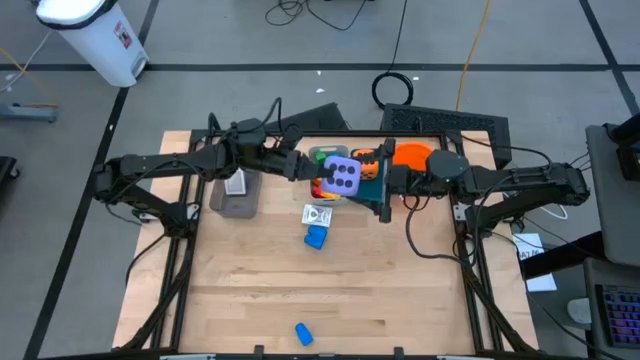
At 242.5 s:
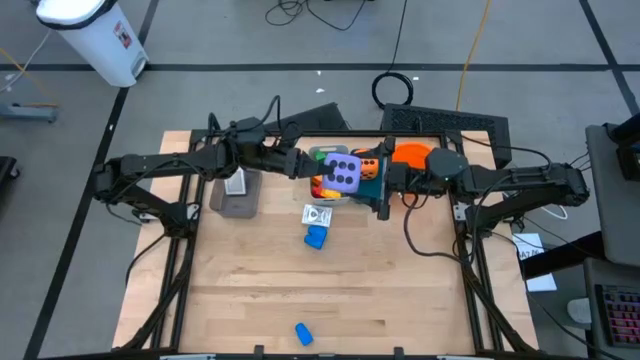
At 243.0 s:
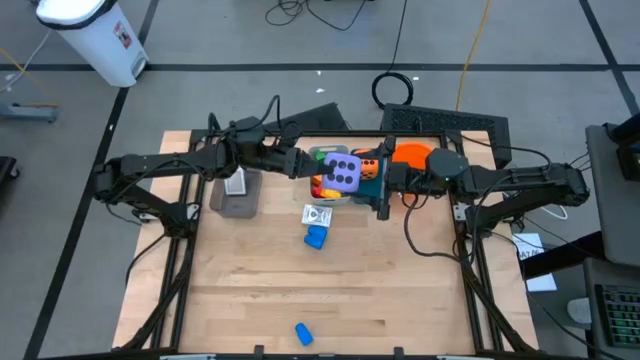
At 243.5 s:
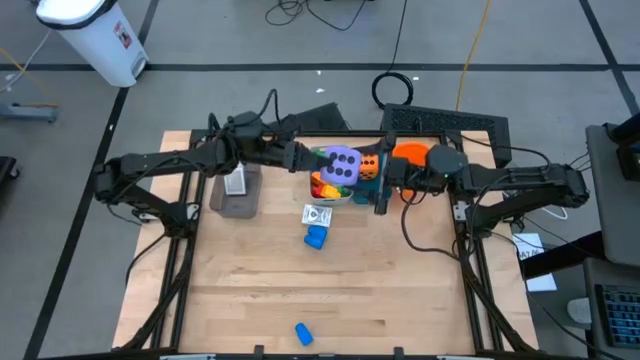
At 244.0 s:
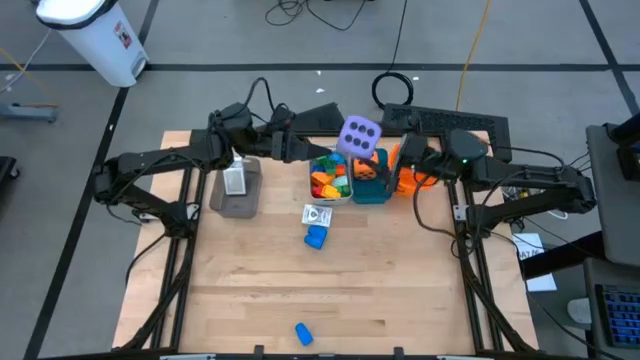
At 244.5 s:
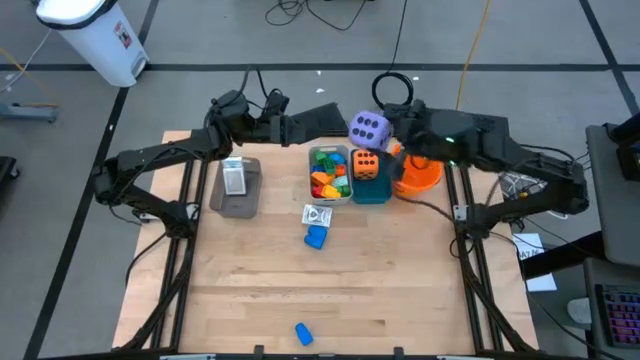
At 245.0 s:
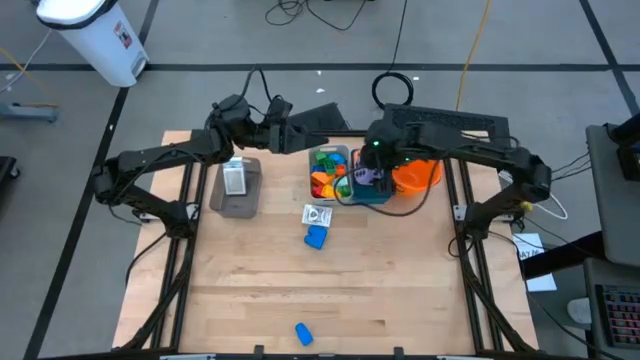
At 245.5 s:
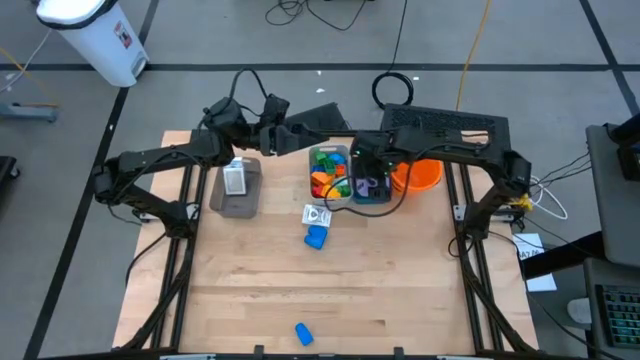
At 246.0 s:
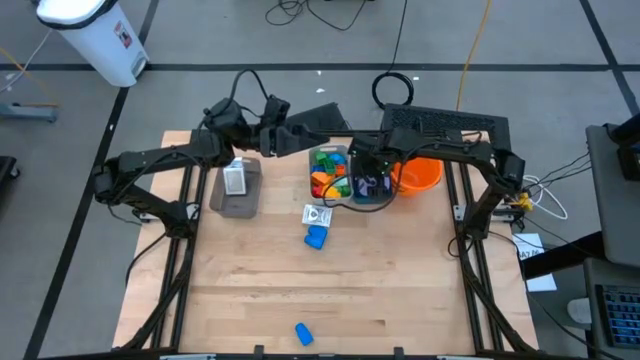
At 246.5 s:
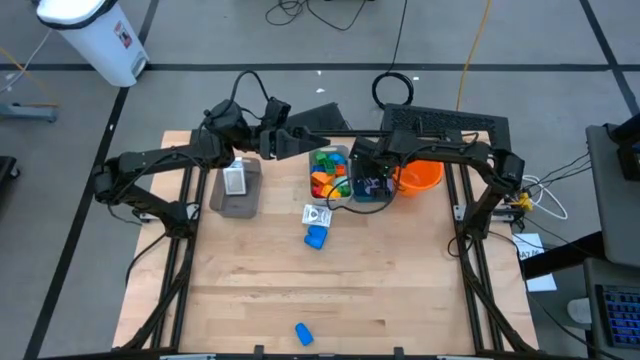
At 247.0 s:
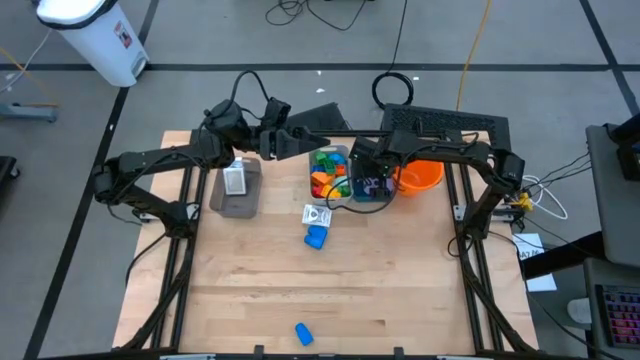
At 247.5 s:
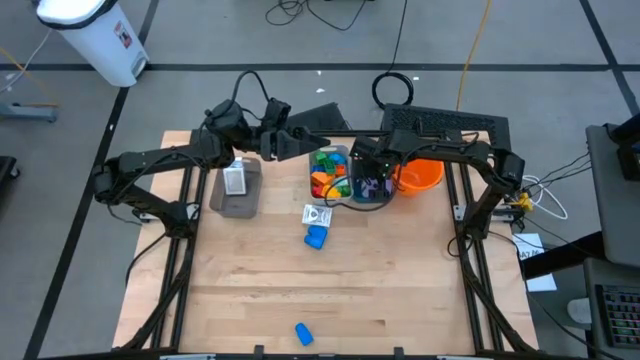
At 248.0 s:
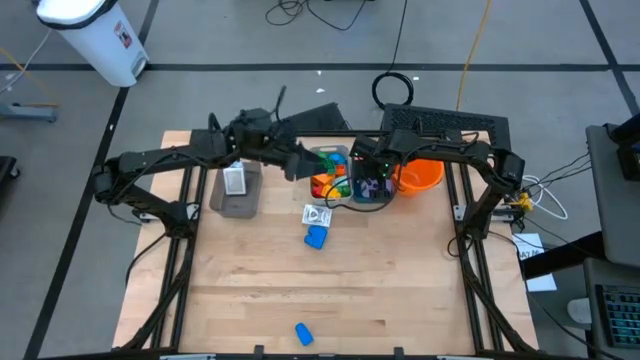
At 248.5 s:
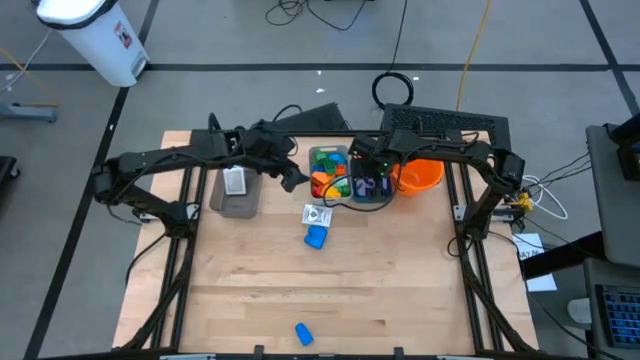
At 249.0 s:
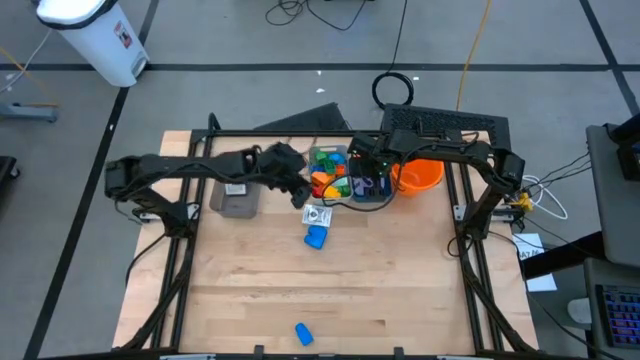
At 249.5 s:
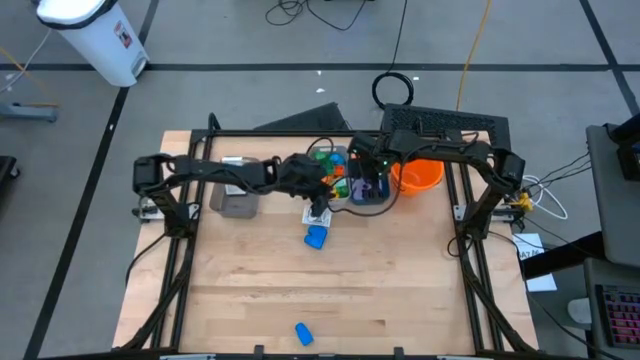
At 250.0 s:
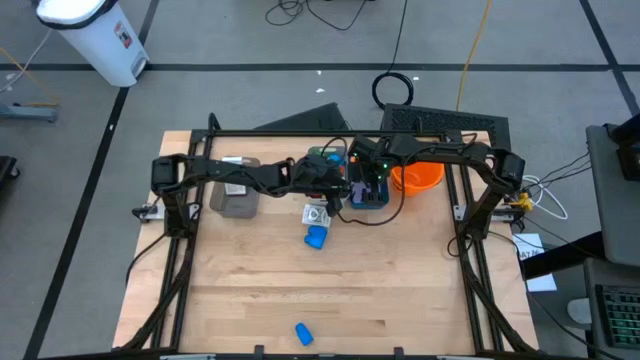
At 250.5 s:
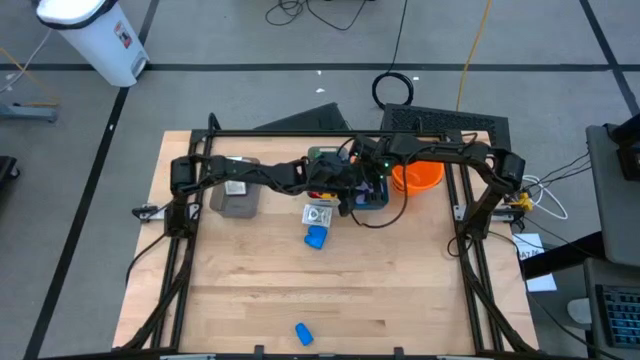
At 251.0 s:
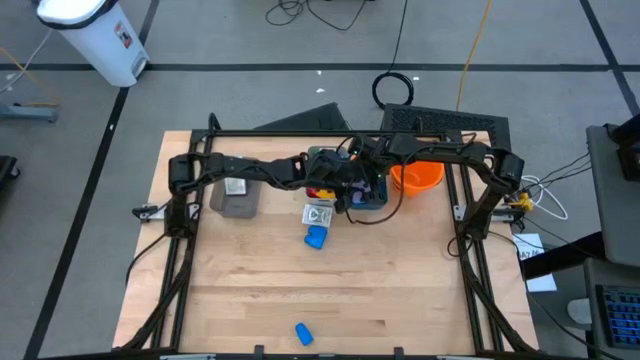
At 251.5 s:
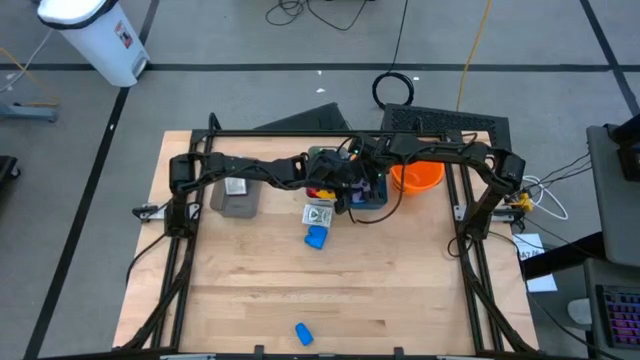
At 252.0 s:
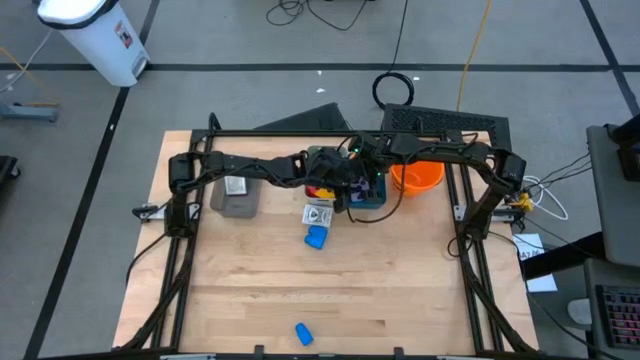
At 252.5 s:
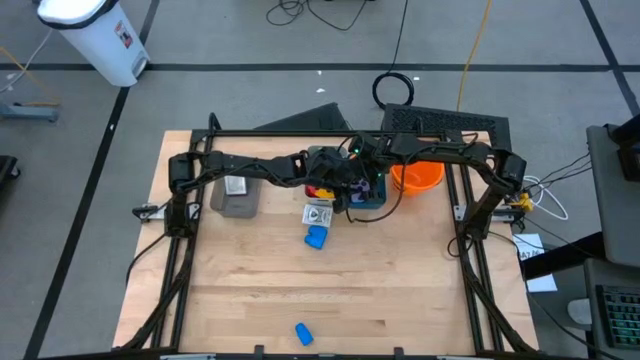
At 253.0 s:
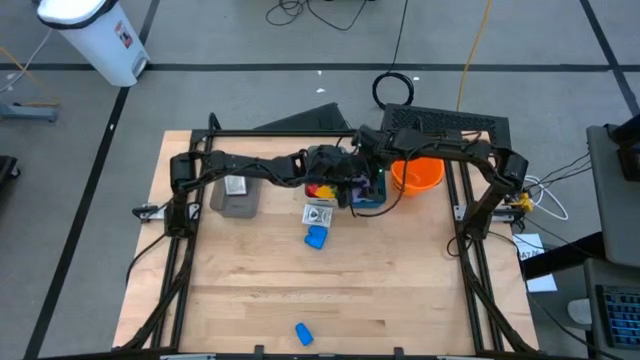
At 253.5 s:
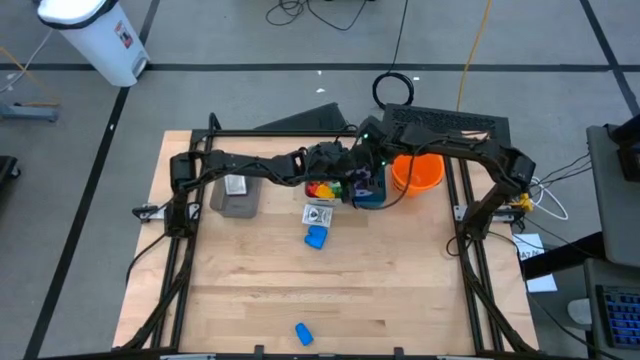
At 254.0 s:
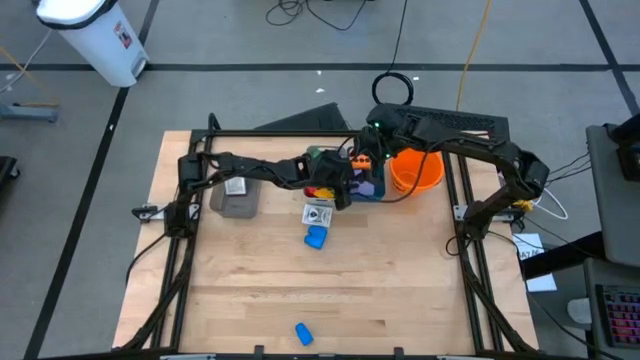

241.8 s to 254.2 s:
Task: Pick & Place Toys
Put the purple dice into the blue bin

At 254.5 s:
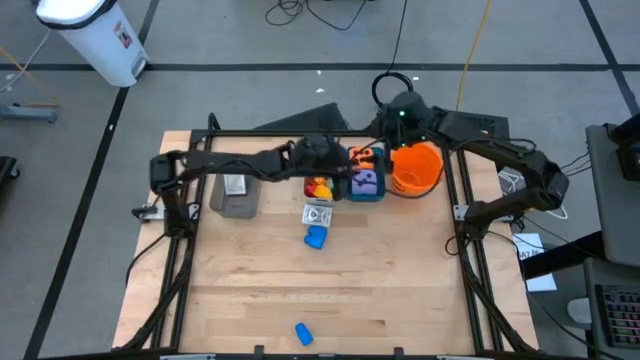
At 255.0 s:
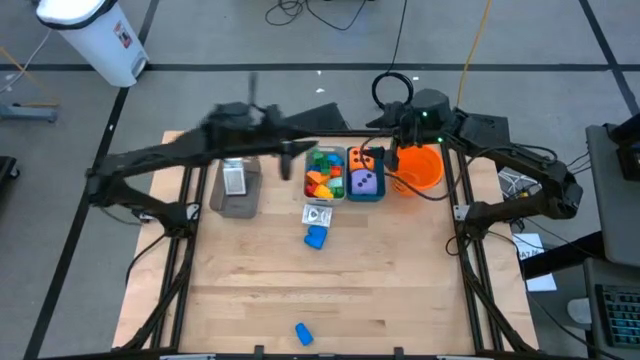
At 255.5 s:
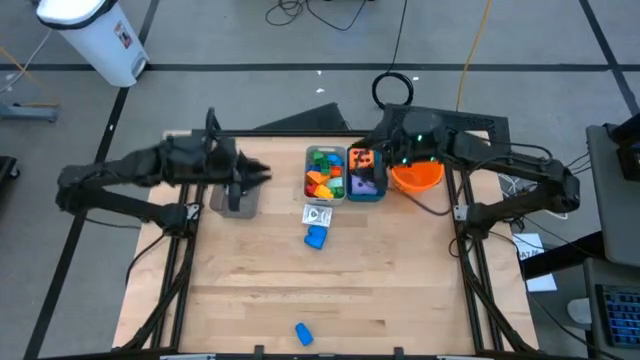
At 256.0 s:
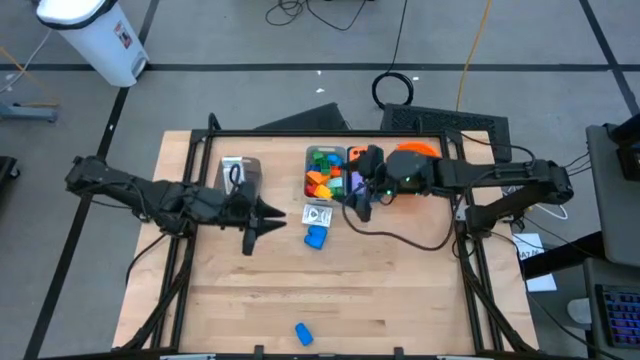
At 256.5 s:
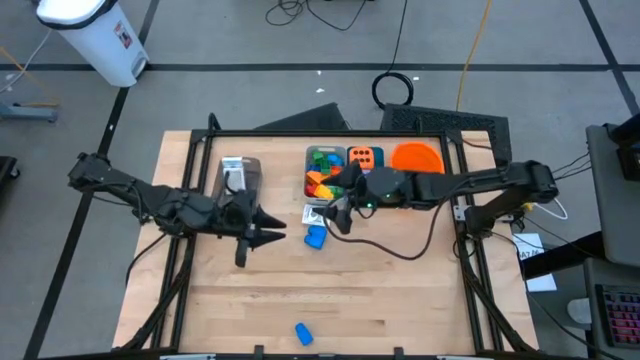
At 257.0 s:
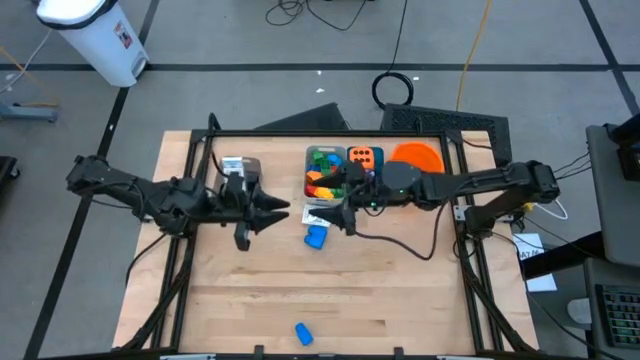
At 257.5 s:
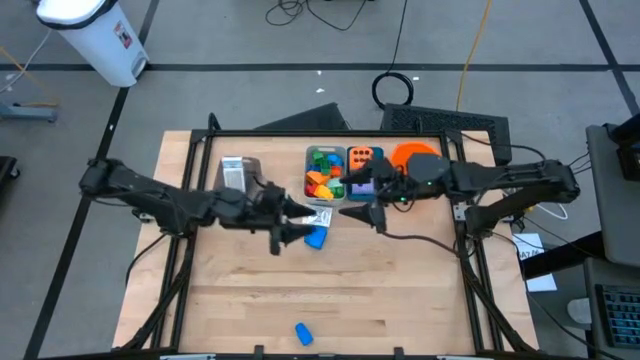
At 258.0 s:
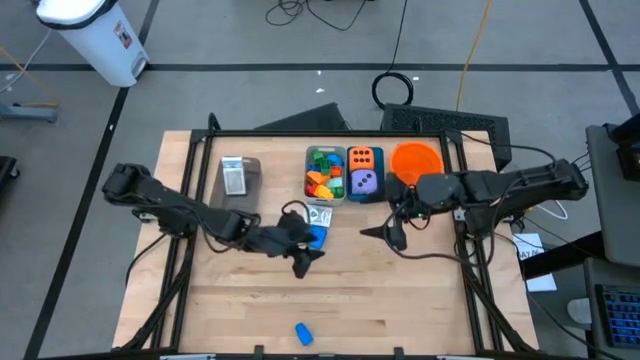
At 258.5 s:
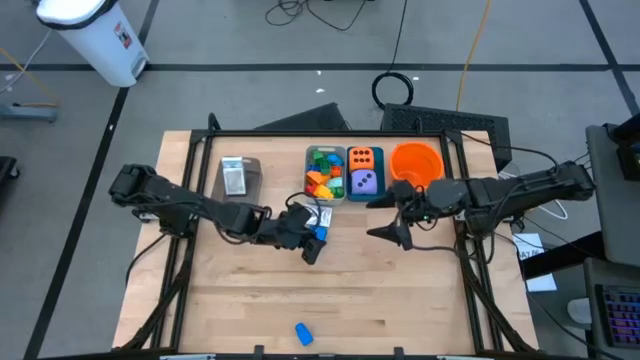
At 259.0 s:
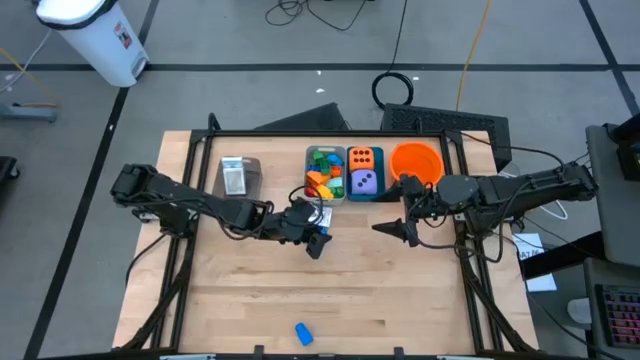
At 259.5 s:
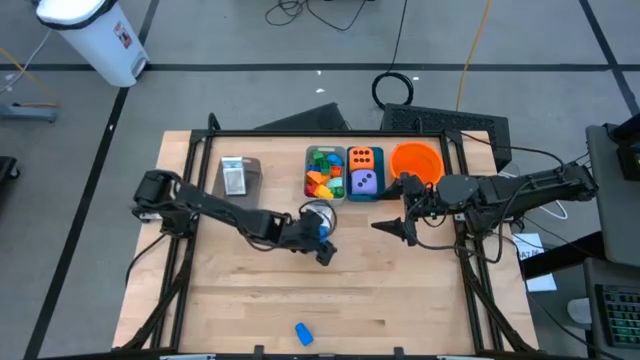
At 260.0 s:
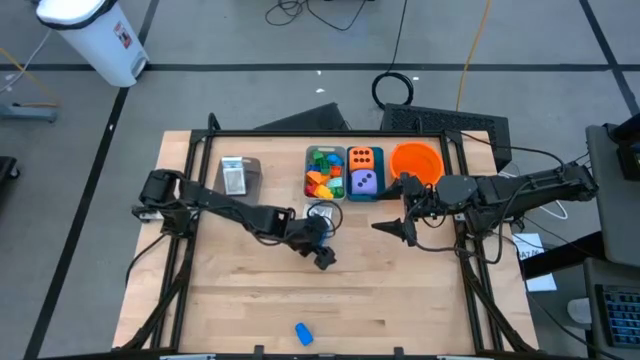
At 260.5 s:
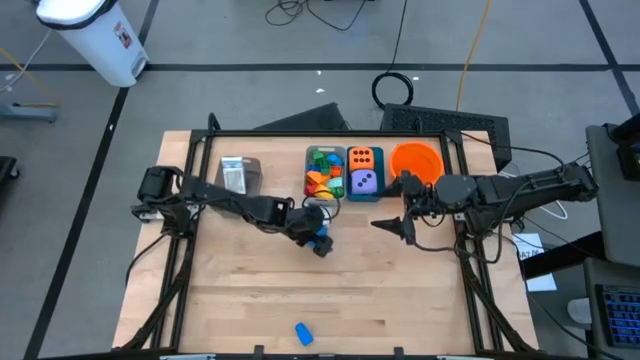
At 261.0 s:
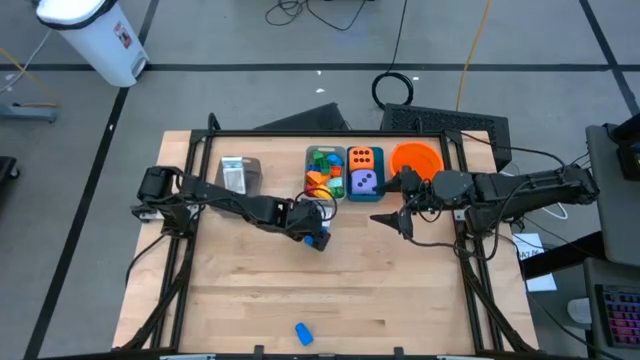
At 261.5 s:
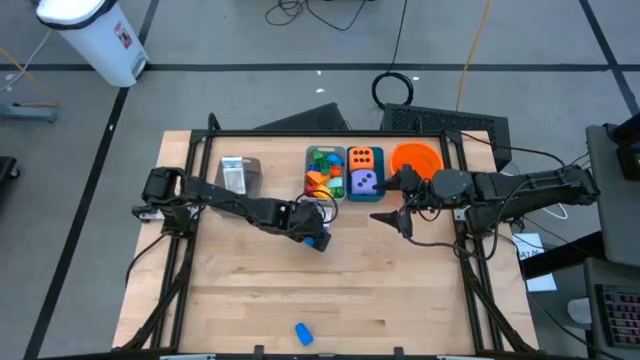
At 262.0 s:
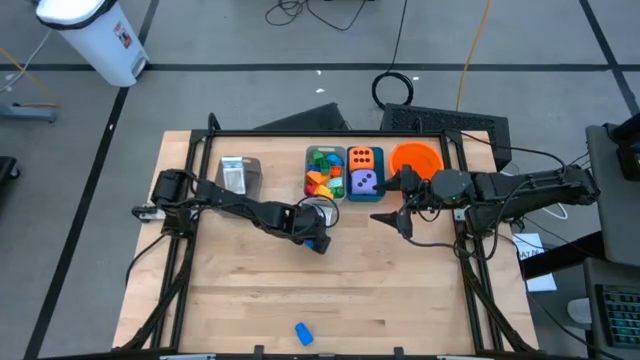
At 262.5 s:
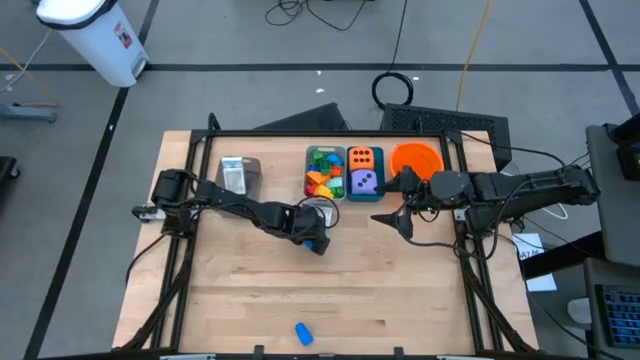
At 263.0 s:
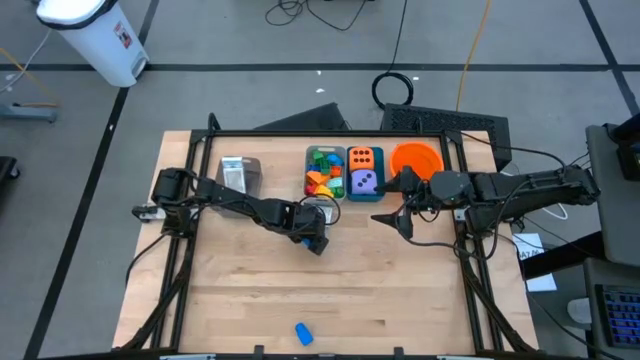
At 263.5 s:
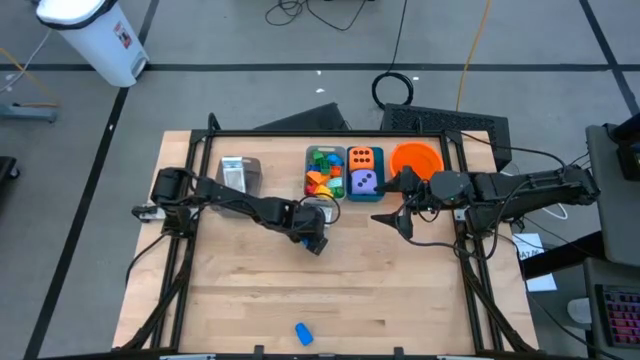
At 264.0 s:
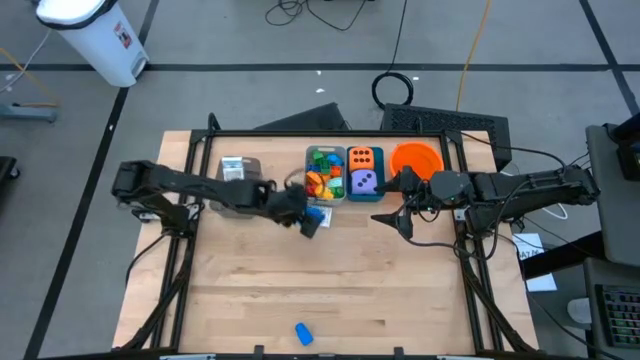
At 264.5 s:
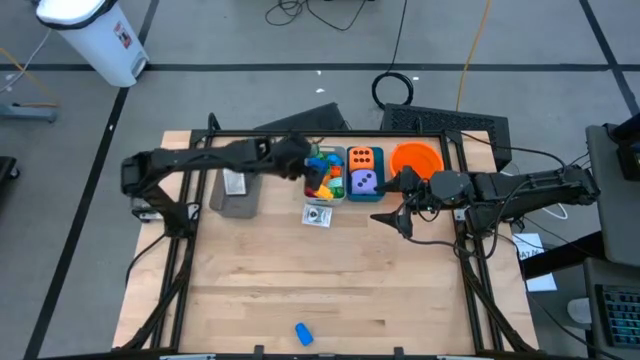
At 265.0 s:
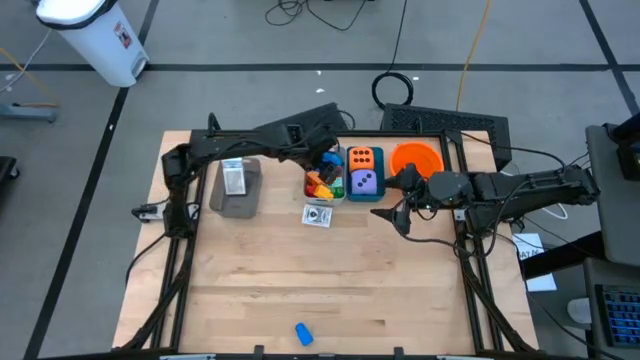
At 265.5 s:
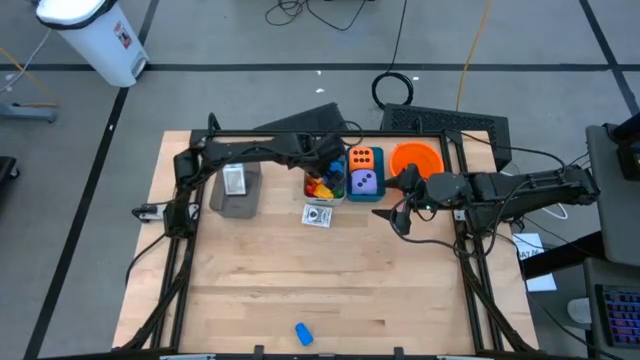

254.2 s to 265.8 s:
Put the blue game piece into the gray bin
